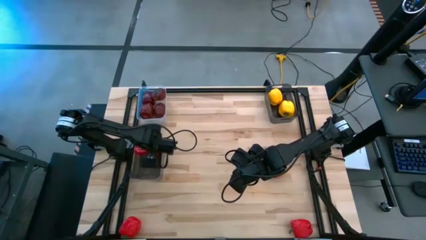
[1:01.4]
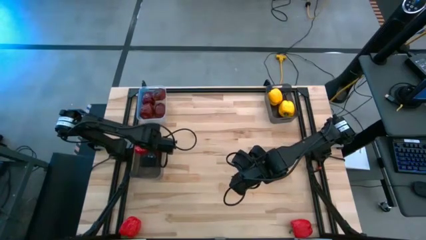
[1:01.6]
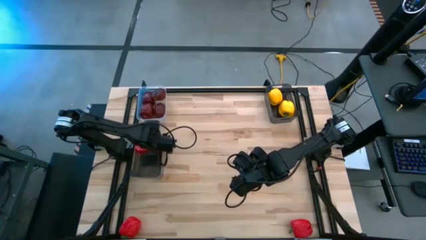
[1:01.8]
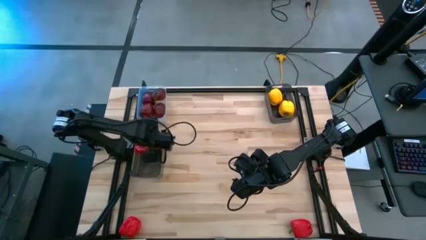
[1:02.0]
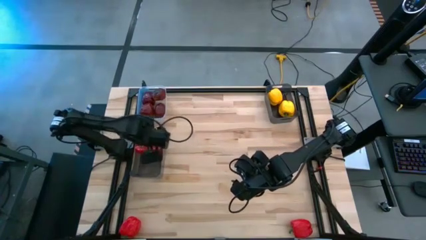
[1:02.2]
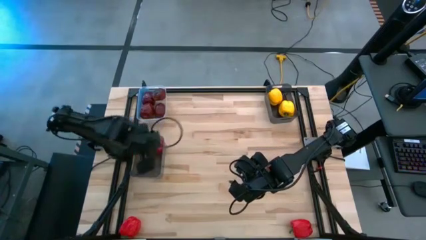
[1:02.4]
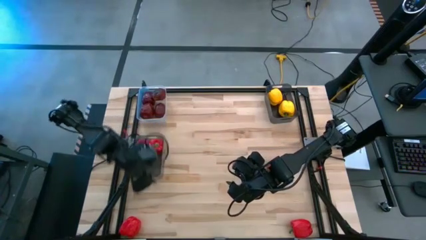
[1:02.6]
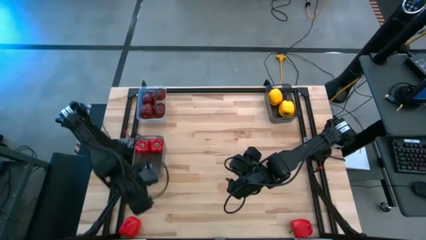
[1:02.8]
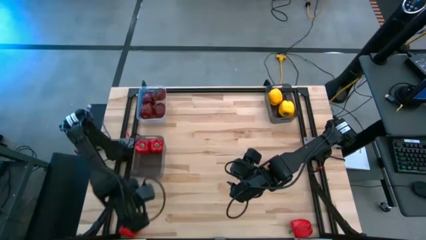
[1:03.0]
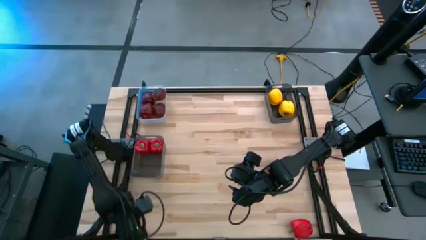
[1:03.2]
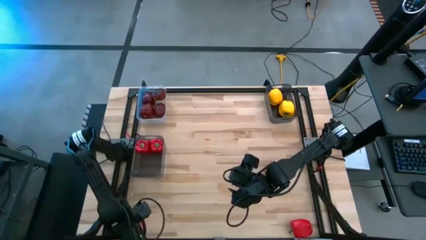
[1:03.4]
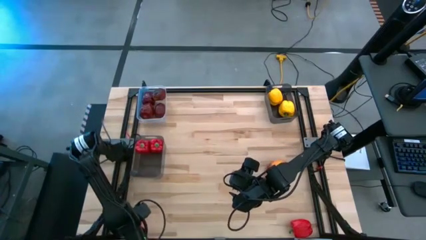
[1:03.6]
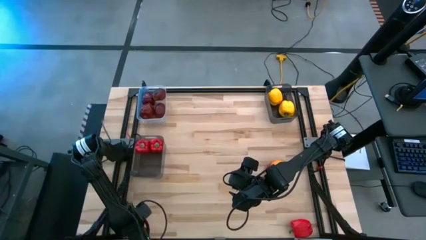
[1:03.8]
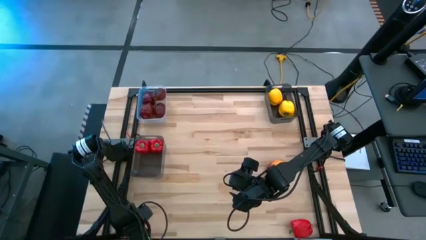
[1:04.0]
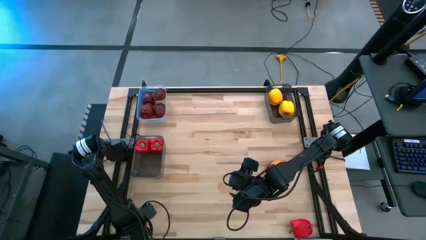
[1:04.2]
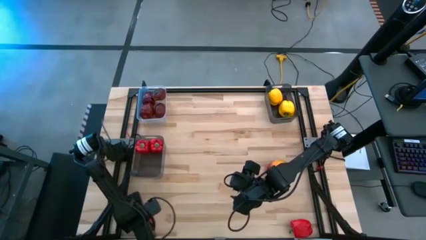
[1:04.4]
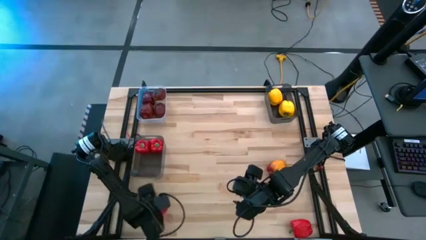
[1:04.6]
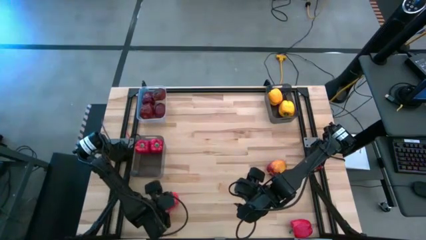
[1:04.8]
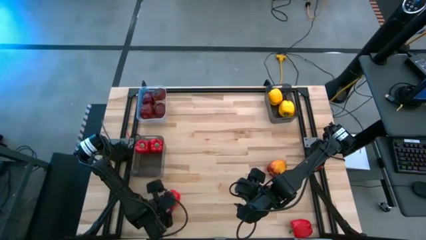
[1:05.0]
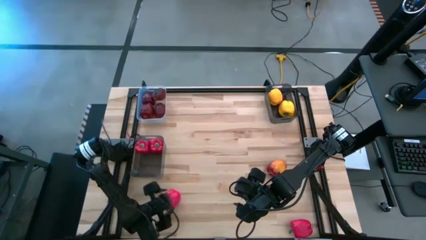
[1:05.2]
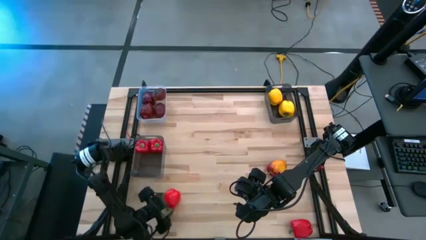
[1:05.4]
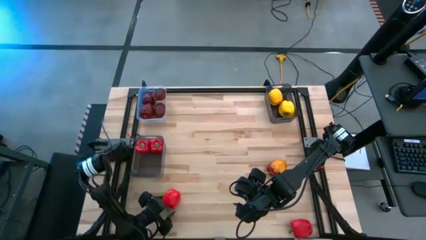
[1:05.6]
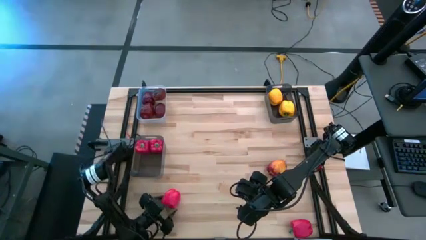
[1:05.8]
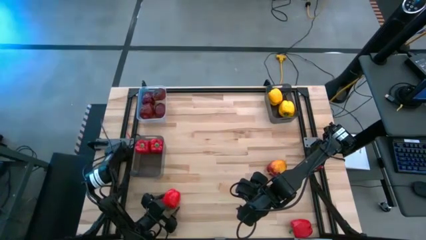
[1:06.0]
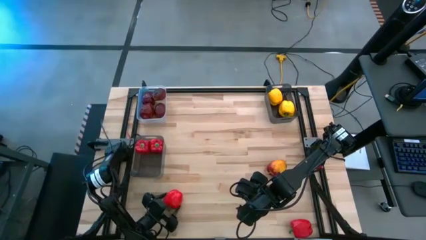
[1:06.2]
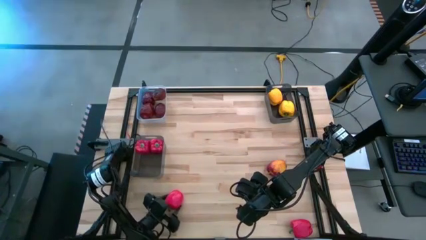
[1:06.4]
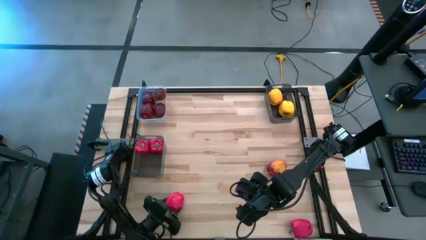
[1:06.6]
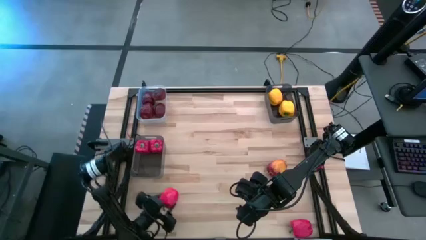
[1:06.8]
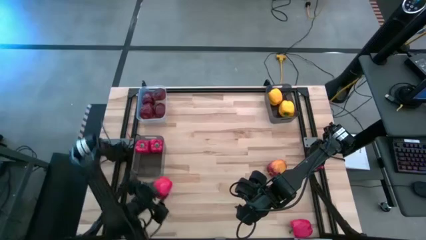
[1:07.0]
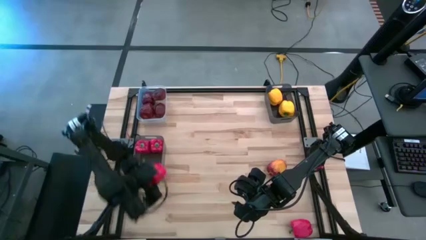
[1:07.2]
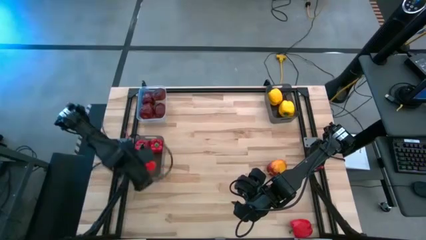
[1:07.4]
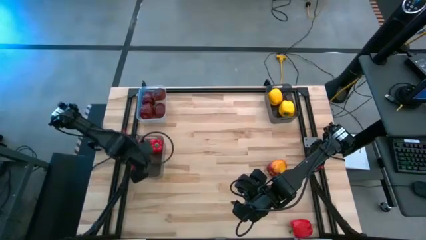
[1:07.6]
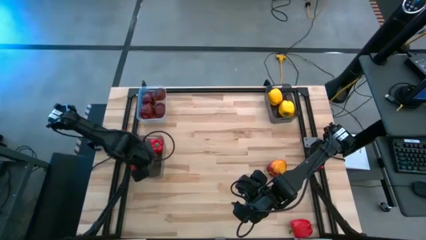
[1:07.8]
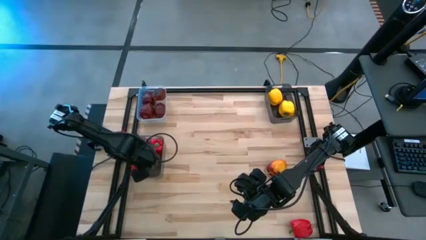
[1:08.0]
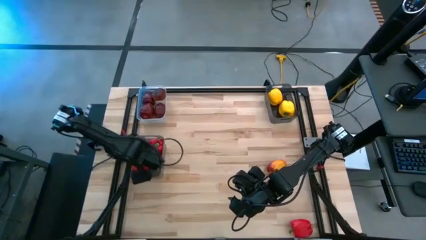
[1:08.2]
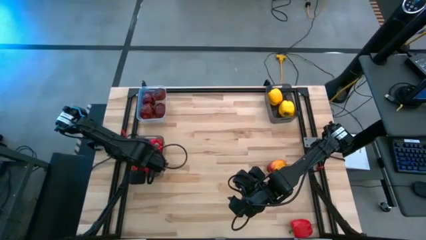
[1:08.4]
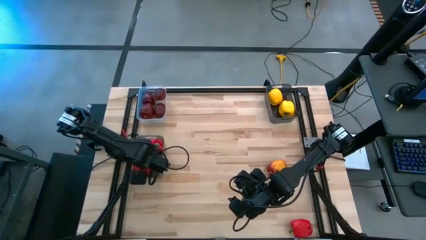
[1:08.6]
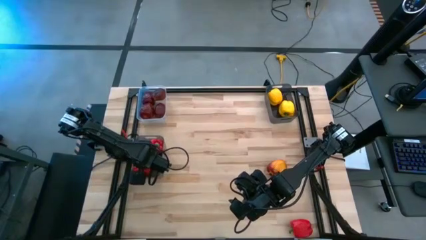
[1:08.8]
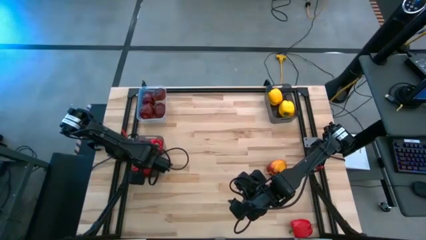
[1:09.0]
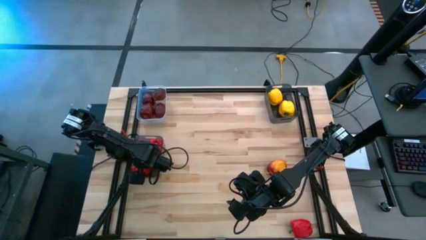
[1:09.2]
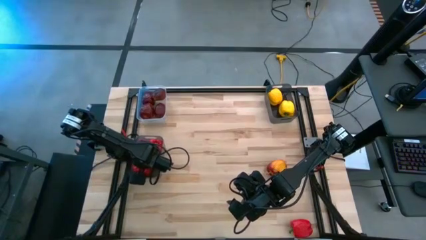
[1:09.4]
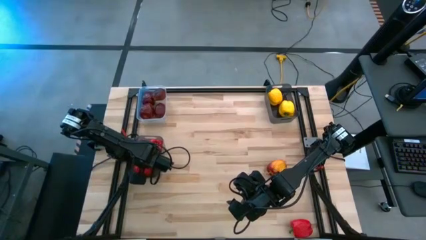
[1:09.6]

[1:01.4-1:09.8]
Task: Sort produce into baskets
Put the red bell pepper into the bottom black bin

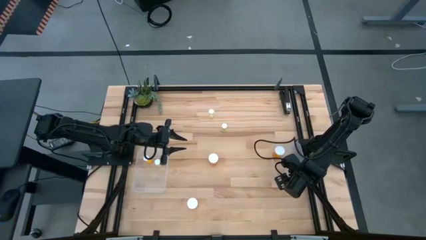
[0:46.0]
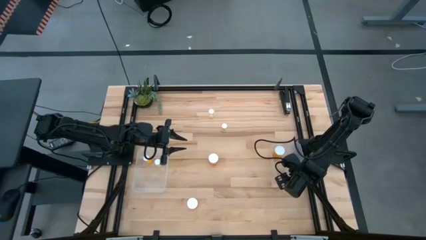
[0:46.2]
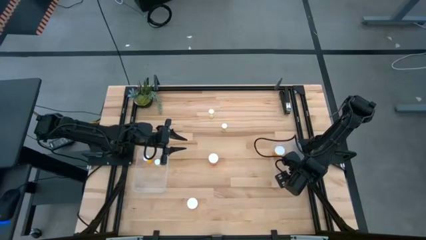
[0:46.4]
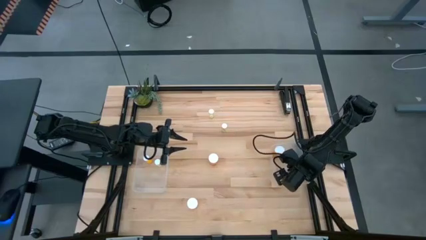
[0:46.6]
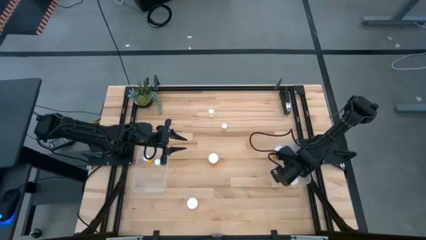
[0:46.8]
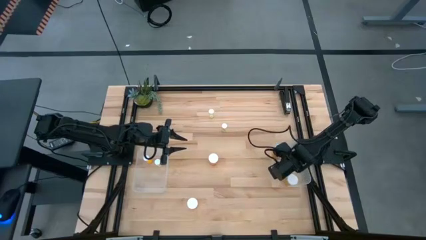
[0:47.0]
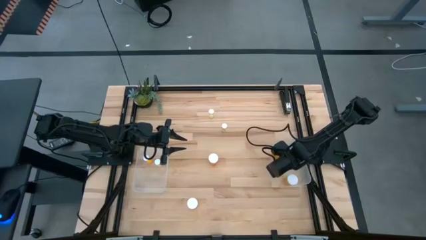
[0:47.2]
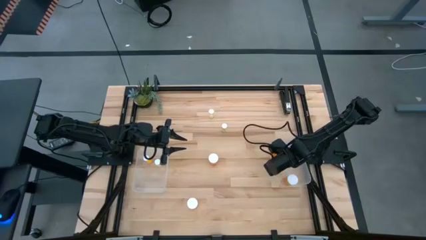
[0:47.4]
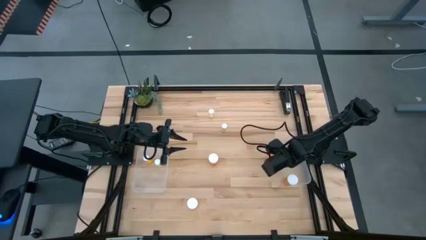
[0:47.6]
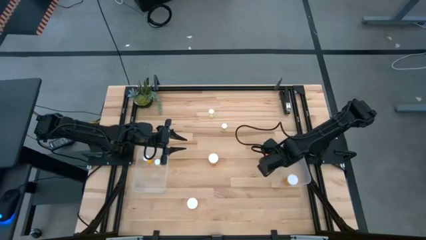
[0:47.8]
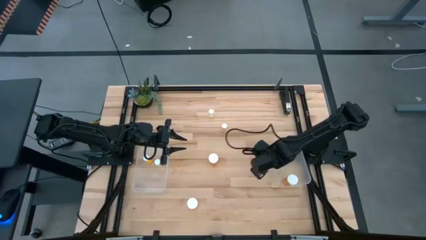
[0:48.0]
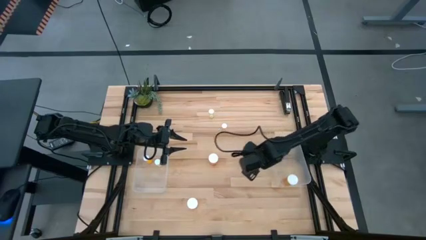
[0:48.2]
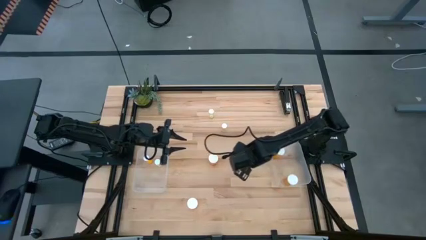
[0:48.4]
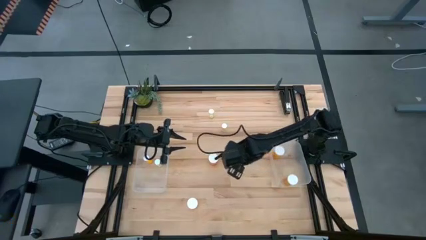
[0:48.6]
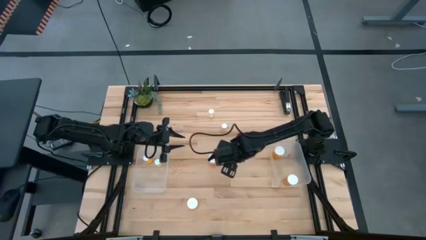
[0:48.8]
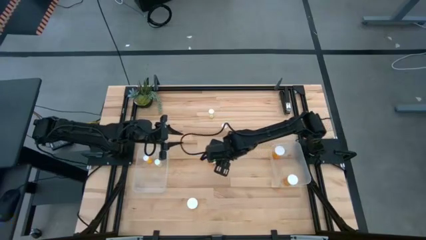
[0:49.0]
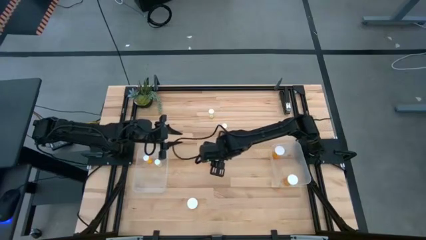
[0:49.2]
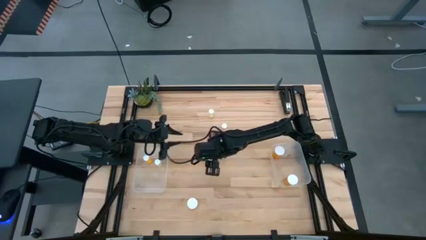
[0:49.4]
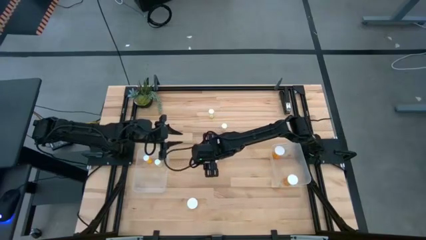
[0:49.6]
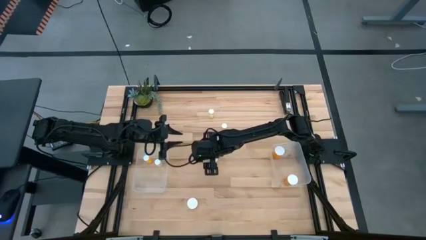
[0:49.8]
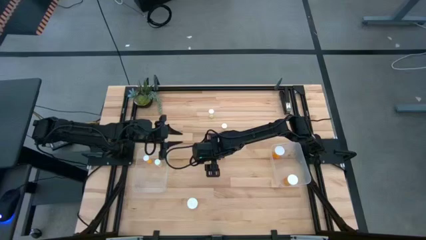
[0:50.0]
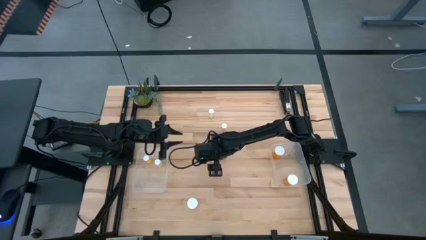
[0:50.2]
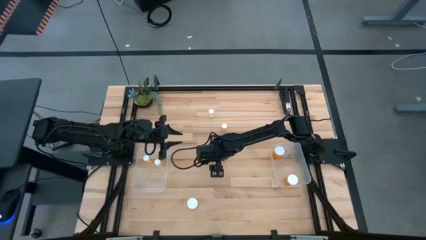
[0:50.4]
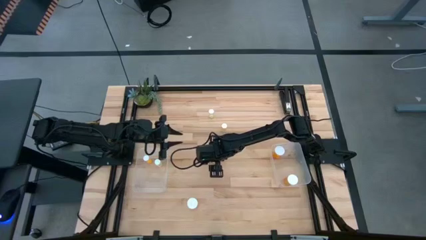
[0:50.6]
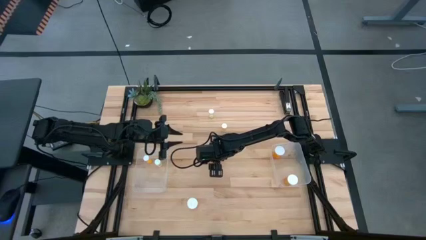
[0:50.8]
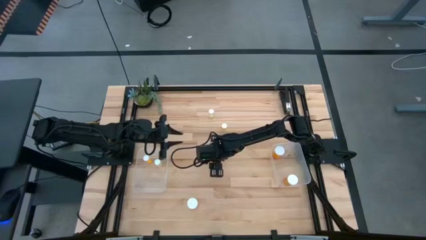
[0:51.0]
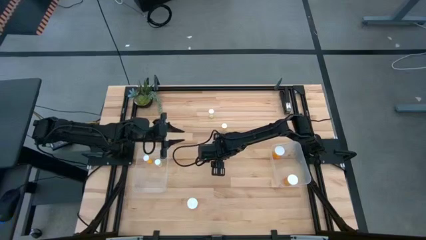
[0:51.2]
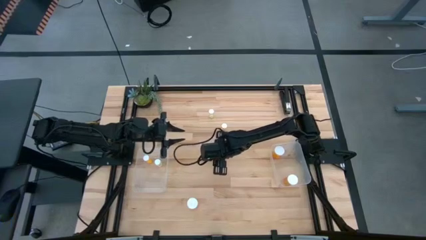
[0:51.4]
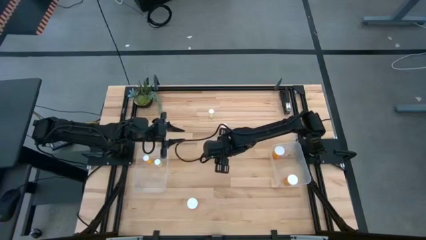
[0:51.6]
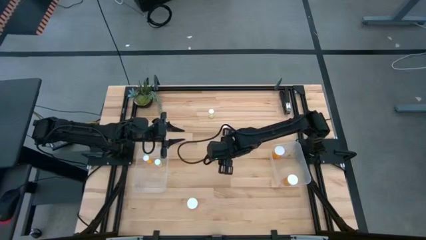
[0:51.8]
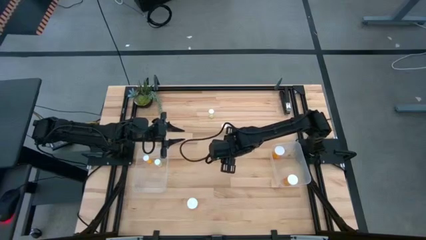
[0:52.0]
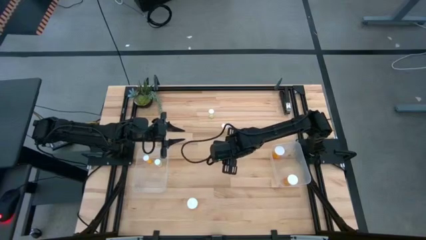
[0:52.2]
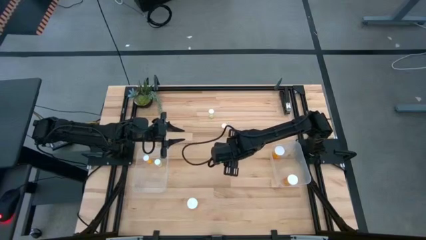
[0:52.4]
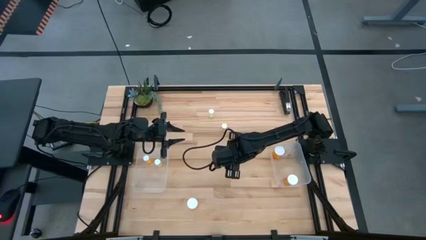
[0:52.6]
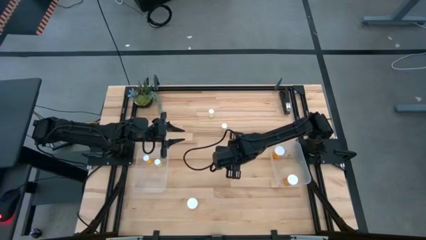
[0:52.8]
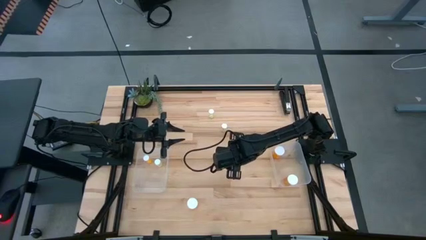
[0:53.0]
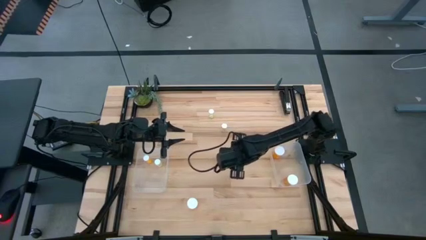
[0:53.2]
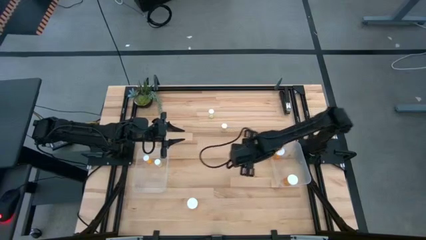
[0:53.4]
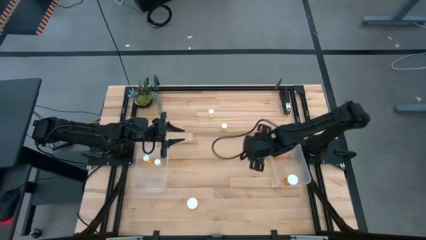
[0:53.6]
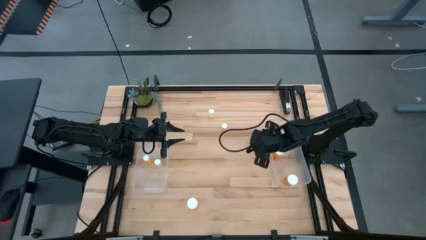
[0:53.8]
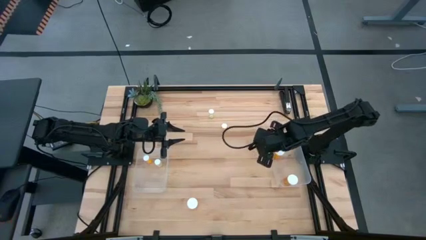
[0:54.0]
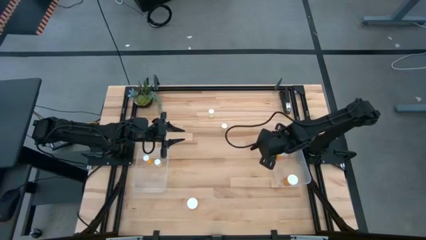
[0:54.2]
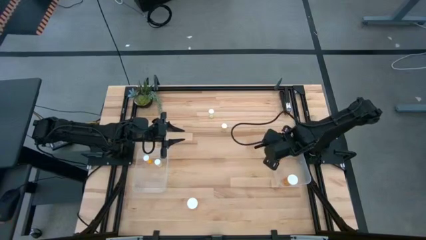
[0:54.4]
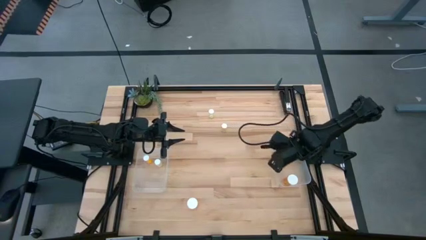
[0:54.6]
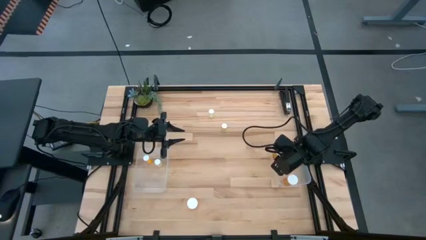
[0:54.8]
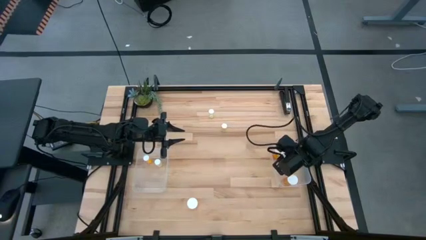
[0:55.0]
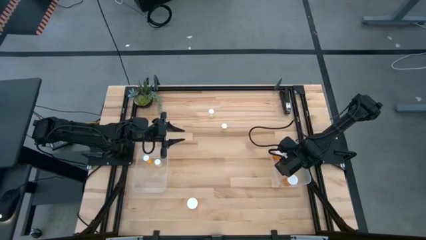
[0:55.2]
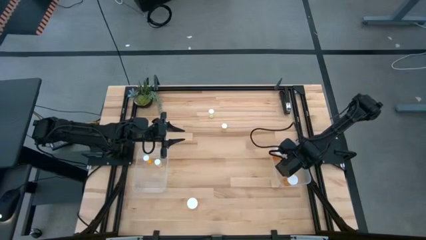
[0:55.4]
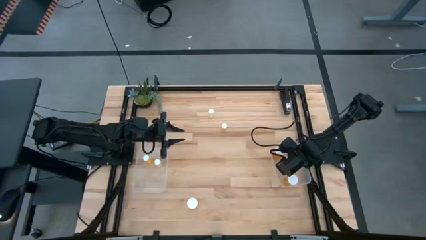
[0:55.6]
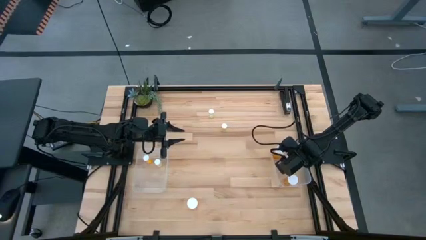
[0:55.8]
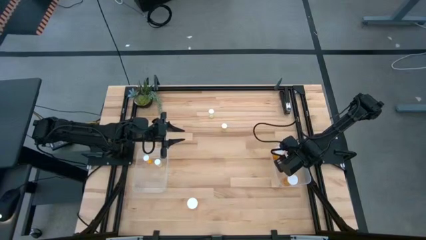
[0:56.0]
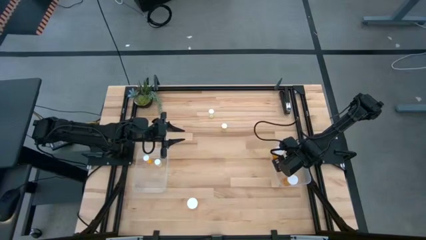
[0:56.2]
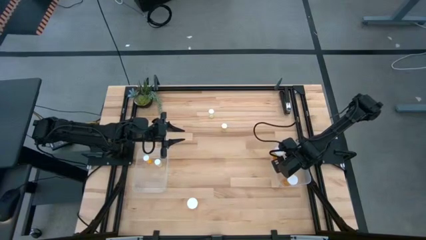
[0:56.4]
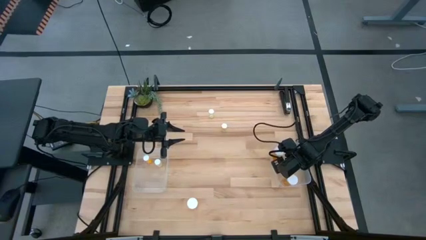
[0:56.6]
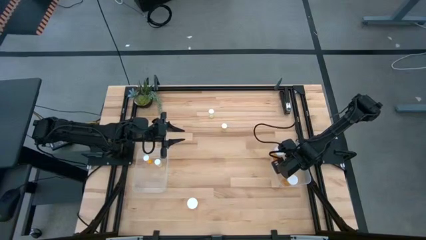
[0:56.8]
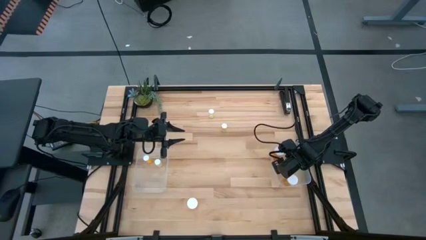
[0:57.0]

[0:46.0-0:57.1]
Task: Pick and place medicine bottles into bin by pill shape (circle, oval)
Put the big top yellow pill bottle into the right transparent bin
